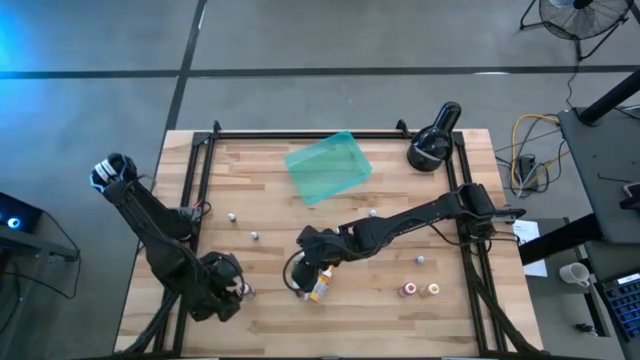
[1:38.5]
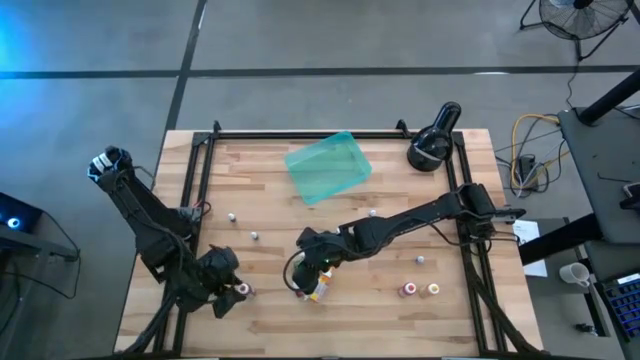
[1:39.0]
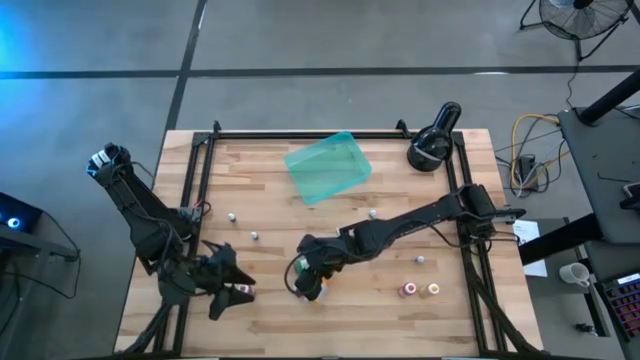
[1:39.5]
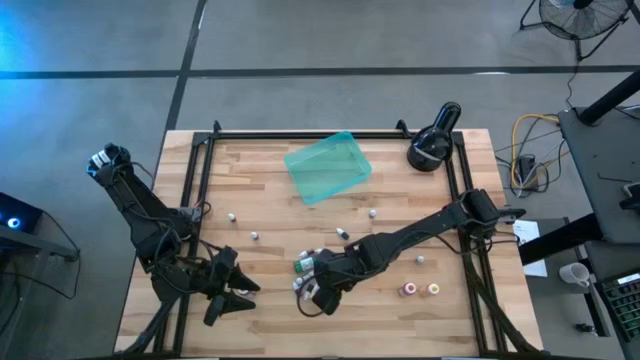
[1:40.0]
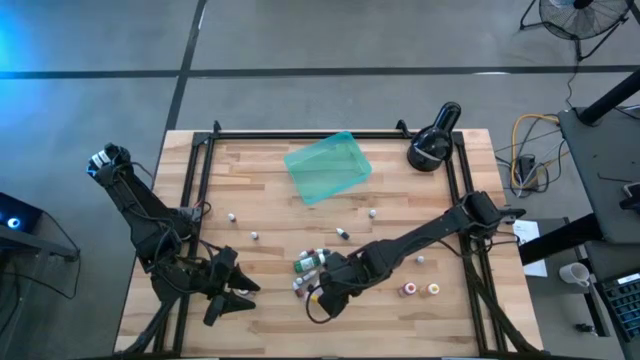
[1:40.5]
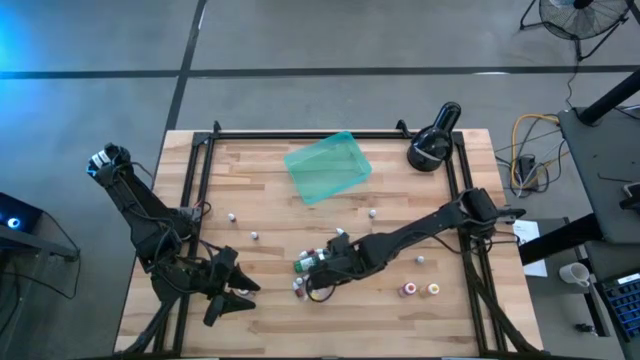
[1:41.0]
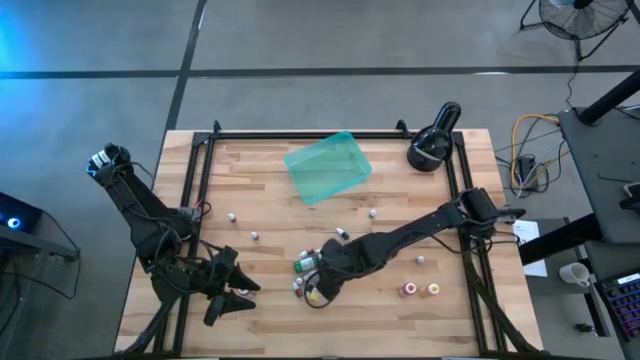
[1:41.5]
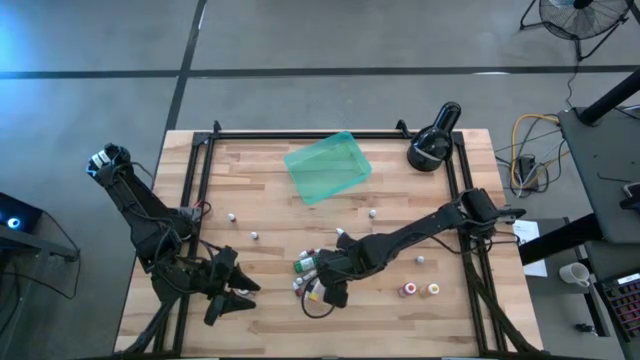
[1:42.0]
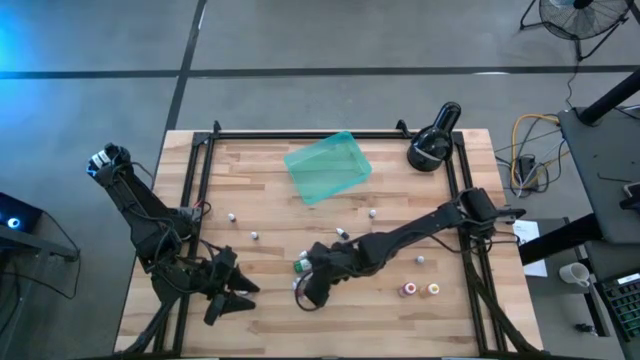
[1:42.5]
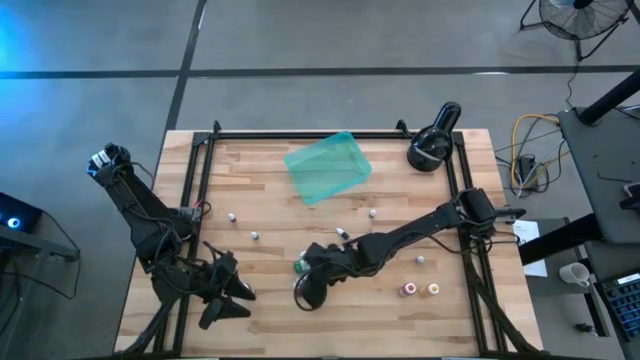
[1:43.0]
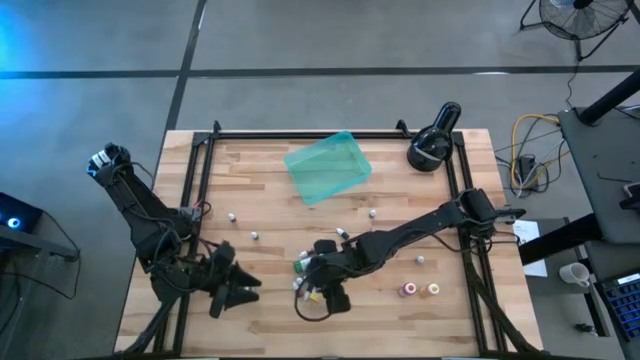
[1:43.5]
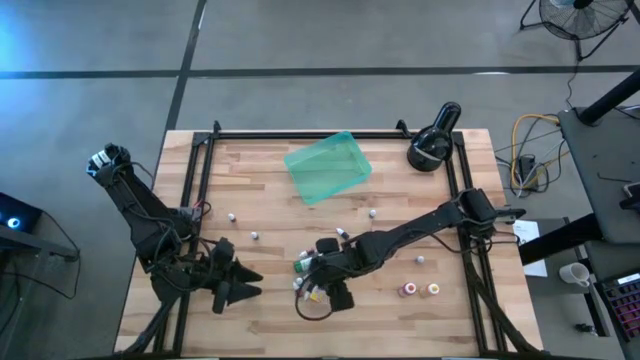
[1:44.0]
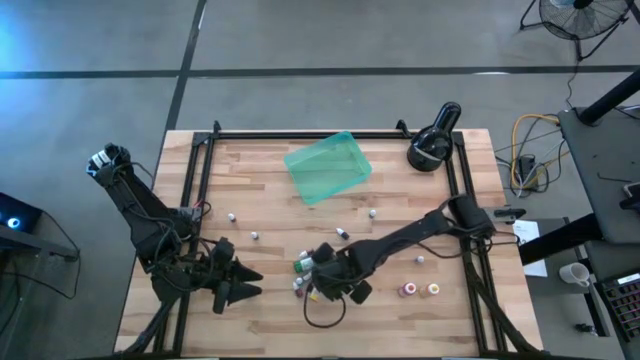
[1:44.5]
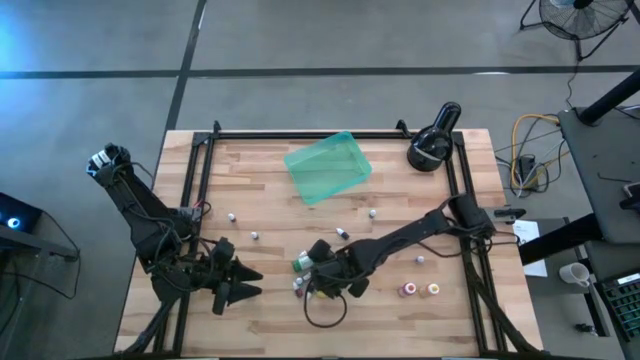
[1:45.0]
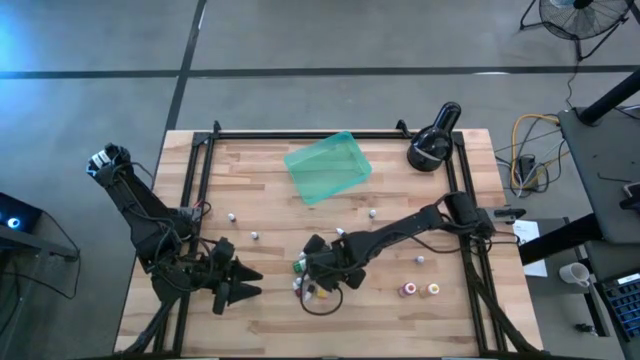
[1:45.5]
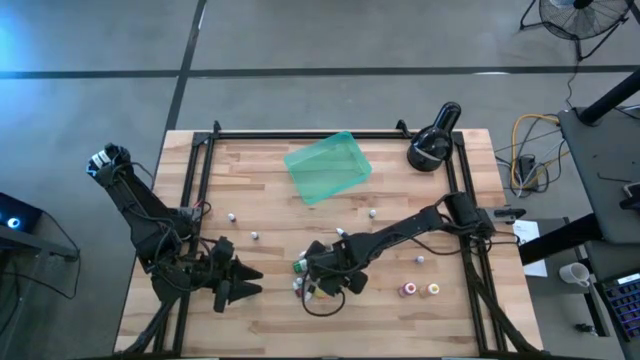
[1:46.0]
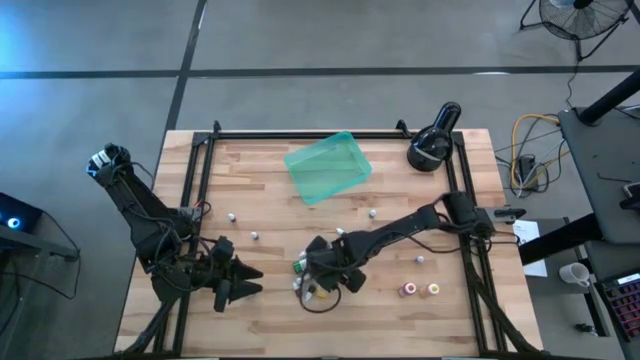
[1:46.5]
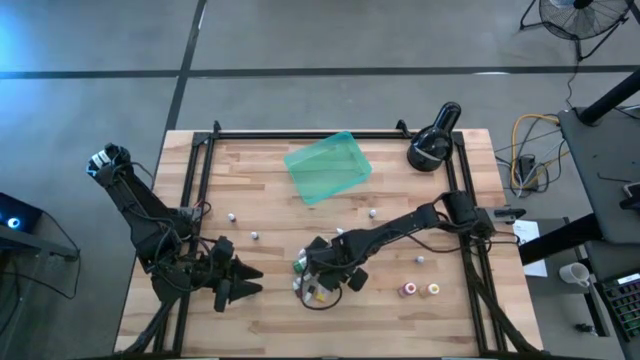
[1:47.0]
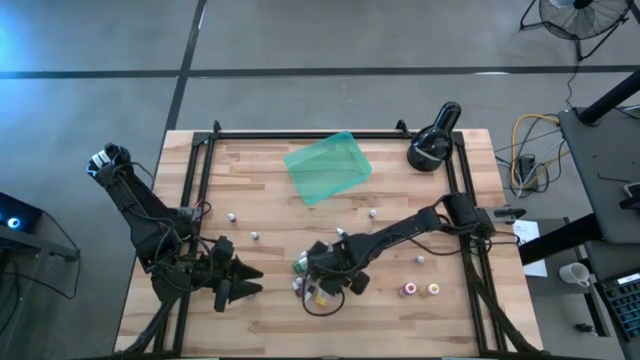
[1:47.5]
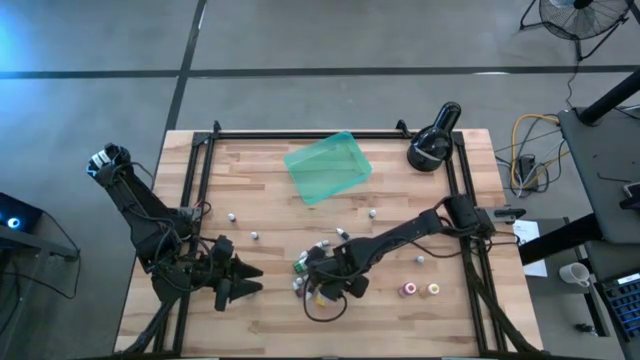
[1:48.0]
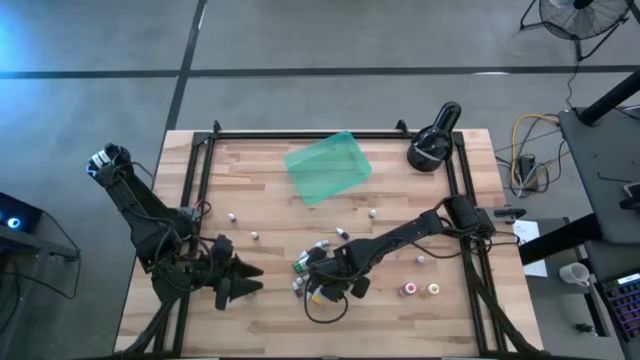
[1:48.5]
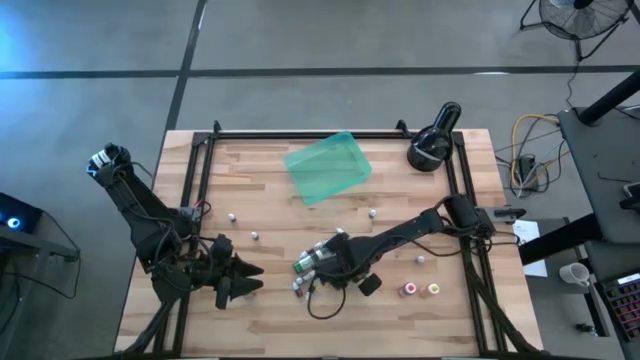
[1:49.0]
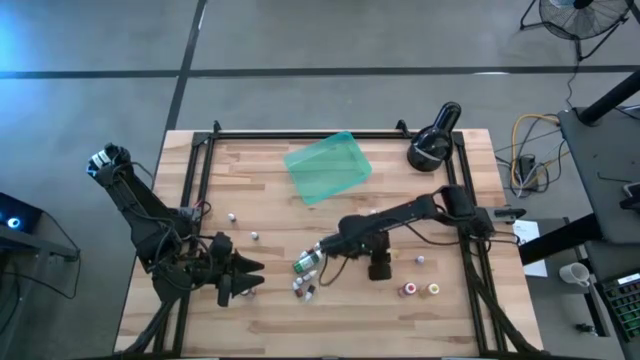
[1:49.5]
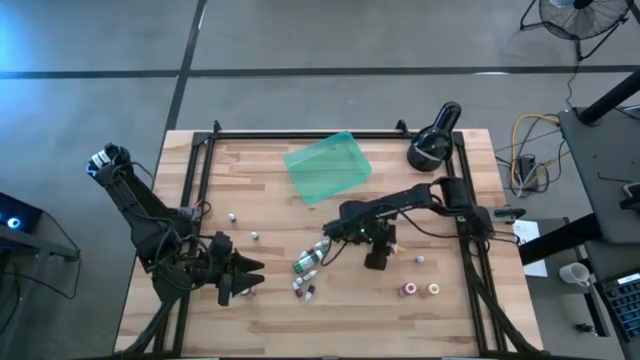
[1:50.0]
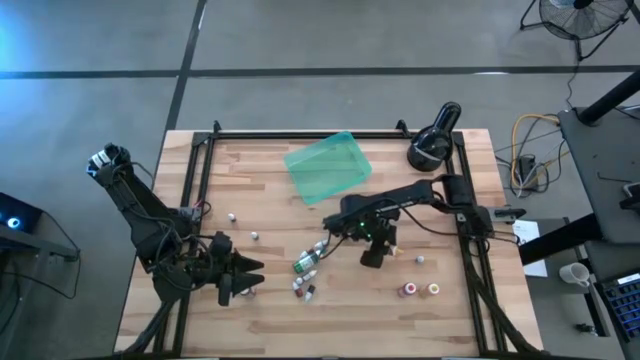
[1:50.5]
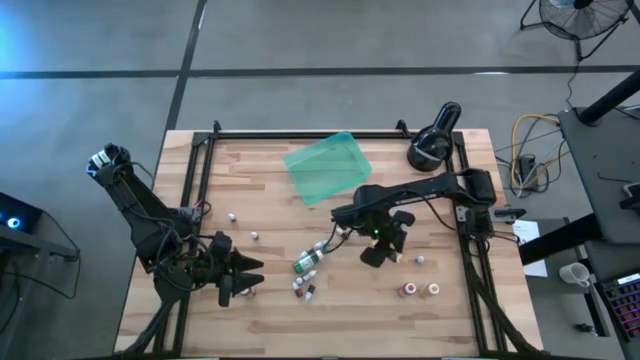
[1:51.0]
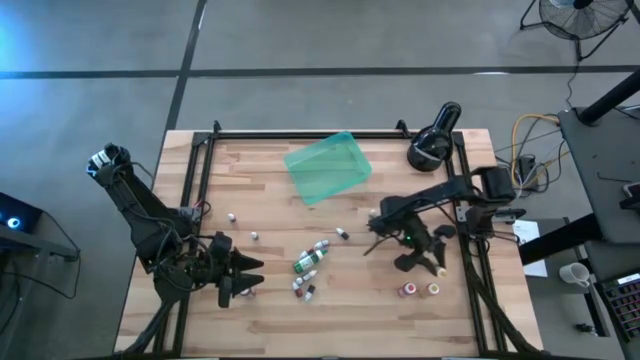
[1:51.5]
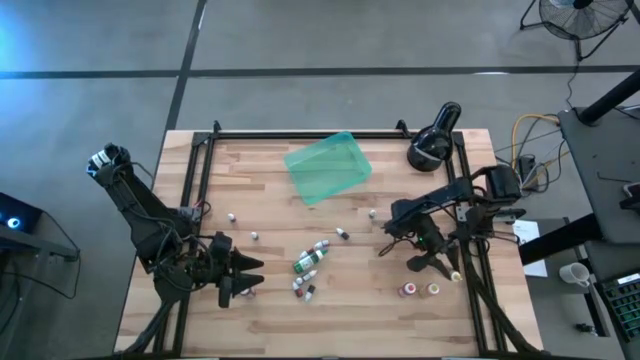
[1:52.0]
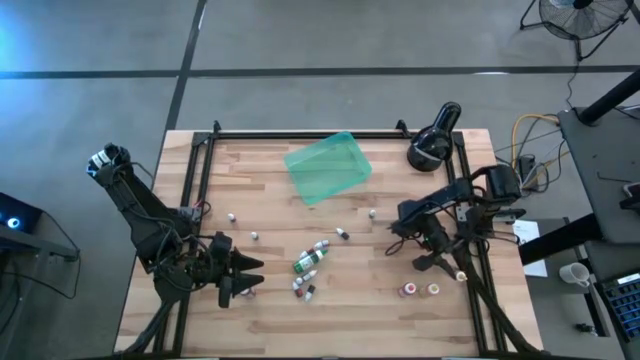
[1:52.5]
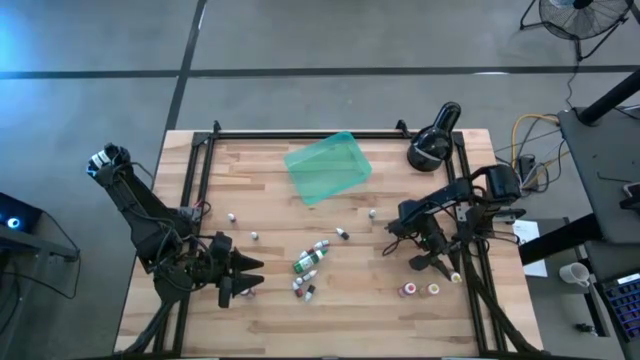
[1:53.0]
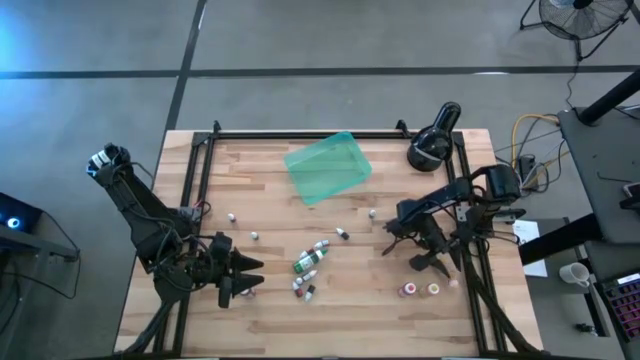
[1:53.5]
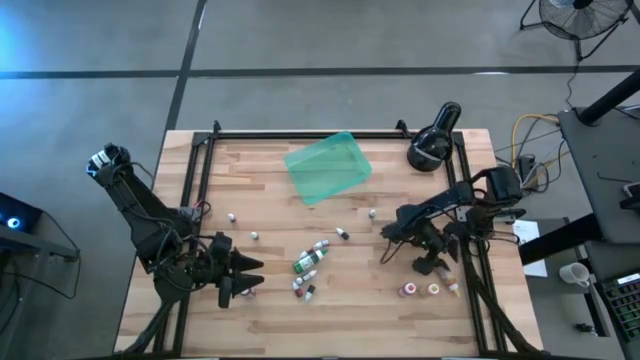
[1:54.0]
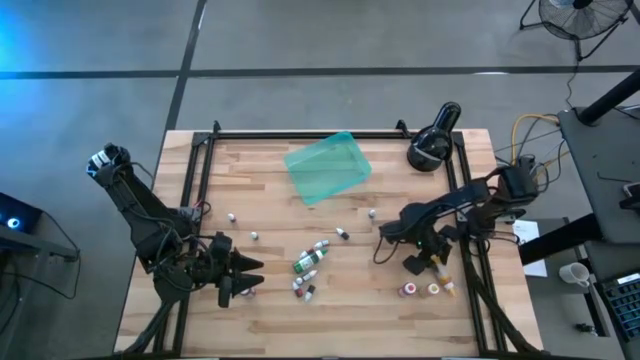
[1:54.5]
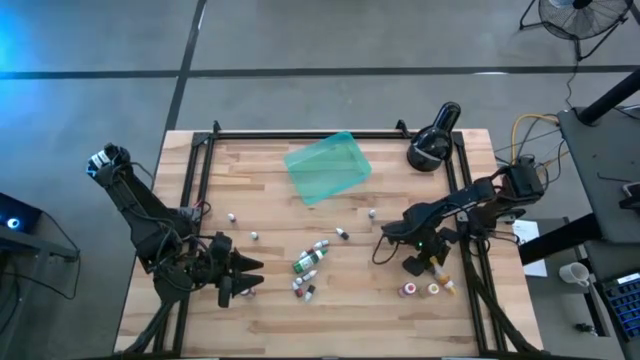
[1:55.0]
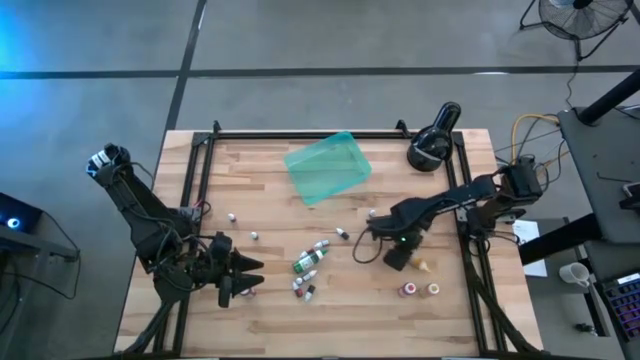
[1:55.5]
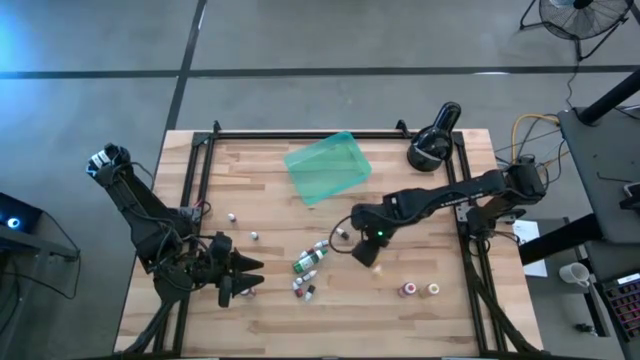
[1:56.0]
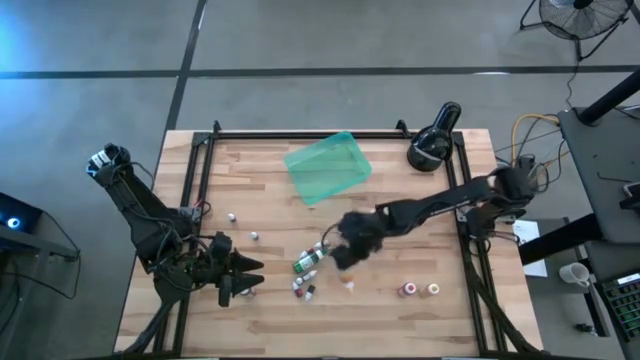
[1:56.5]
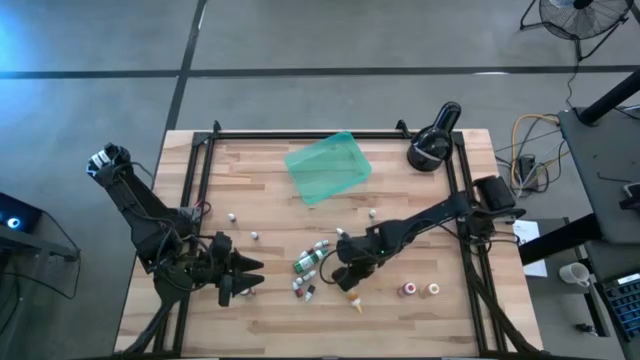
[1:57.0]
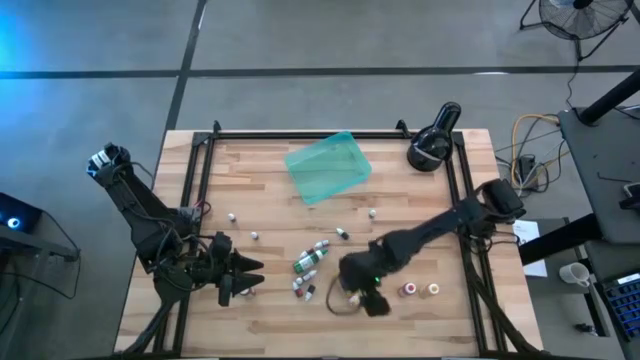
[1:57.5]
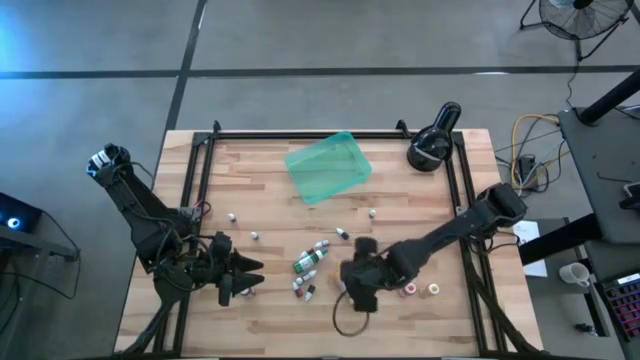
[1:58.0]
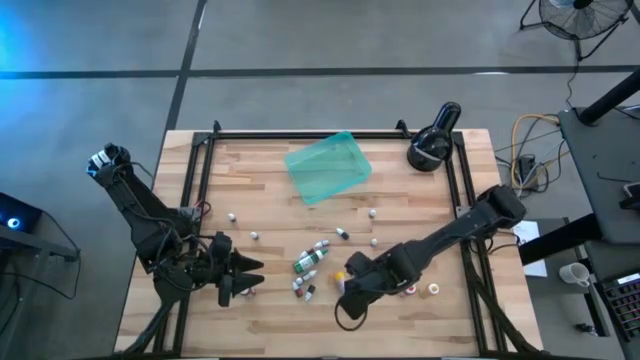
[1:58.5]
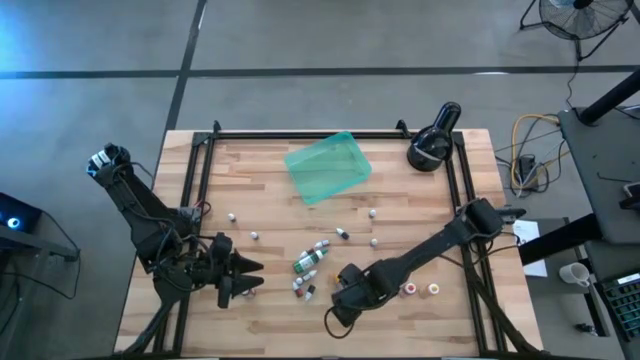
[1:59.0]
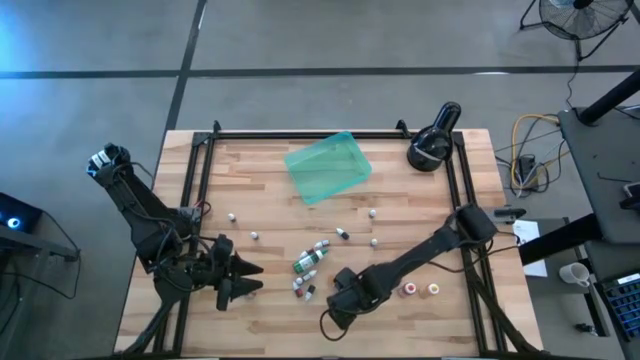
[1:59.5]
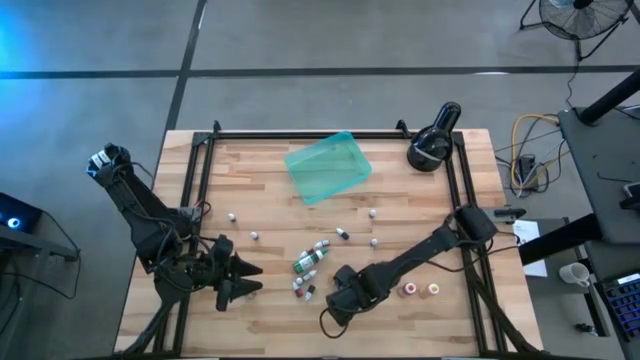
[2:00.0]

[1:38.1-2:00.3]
Task: Pick & Place food coloring
Adjust the orange big food coloring bottle
